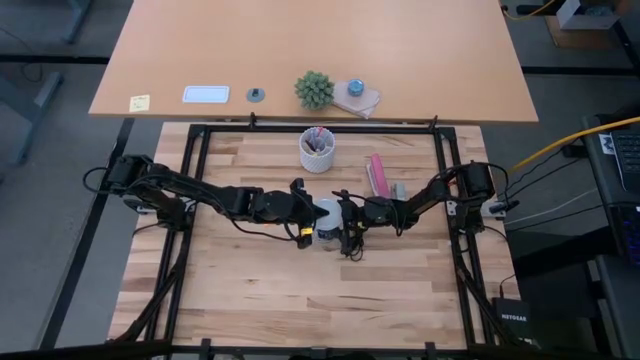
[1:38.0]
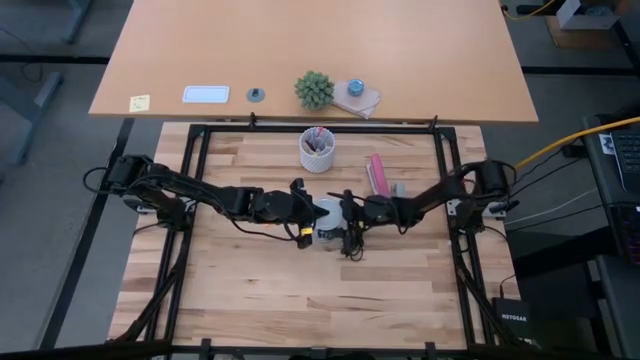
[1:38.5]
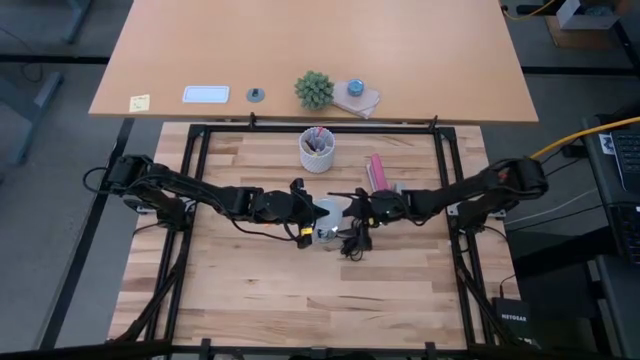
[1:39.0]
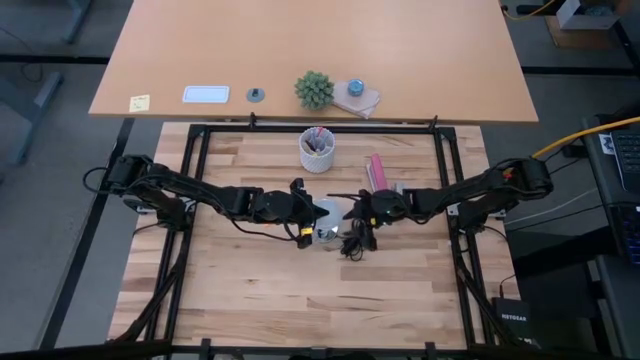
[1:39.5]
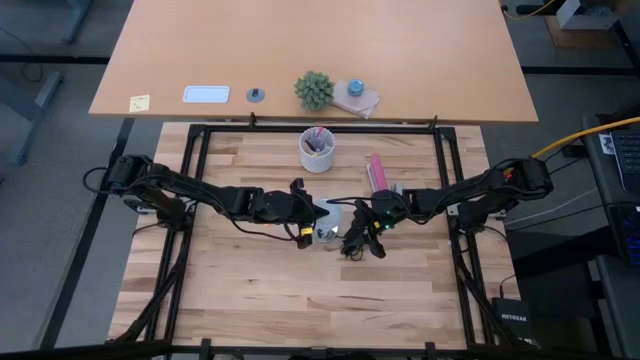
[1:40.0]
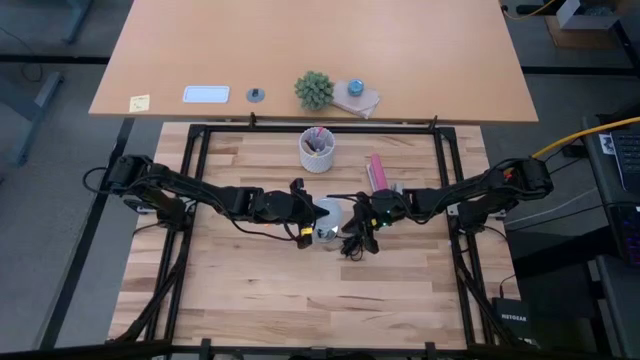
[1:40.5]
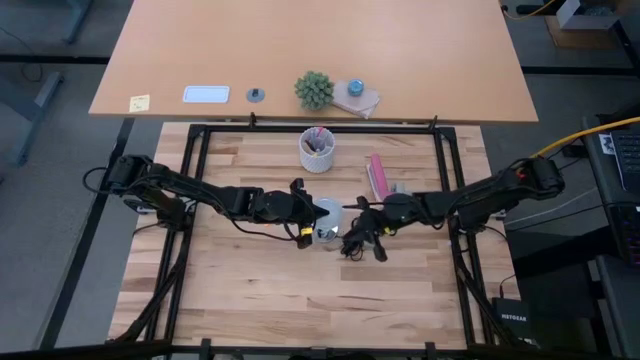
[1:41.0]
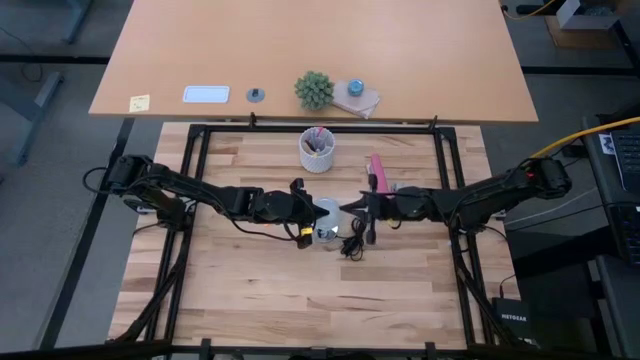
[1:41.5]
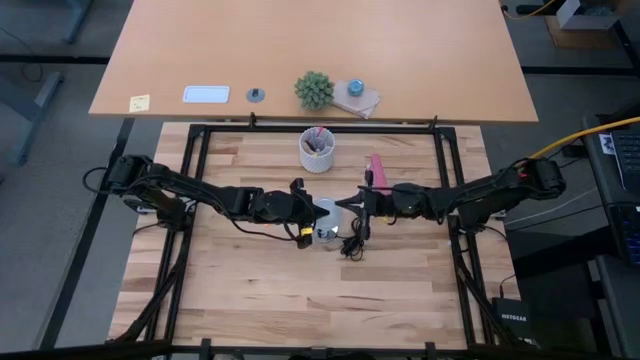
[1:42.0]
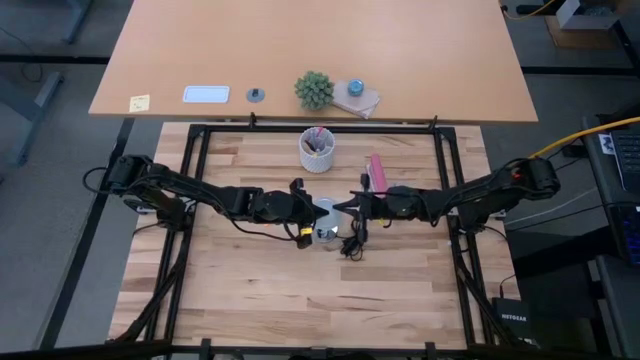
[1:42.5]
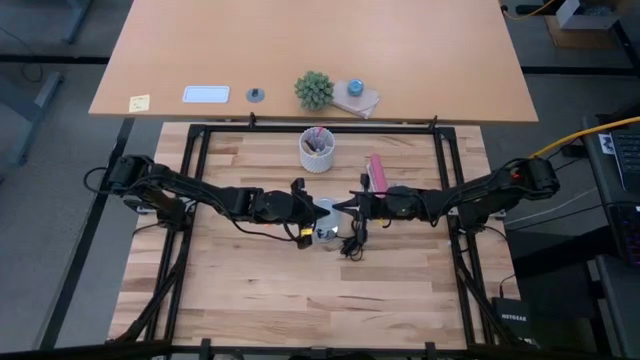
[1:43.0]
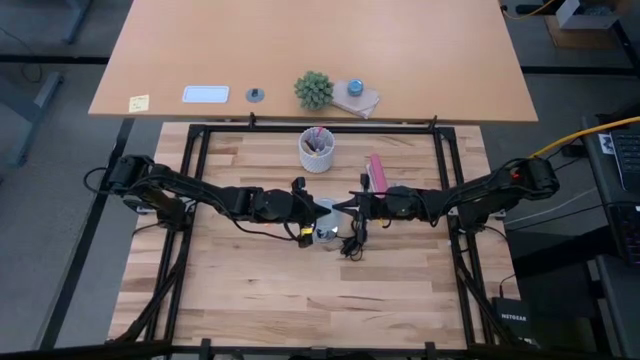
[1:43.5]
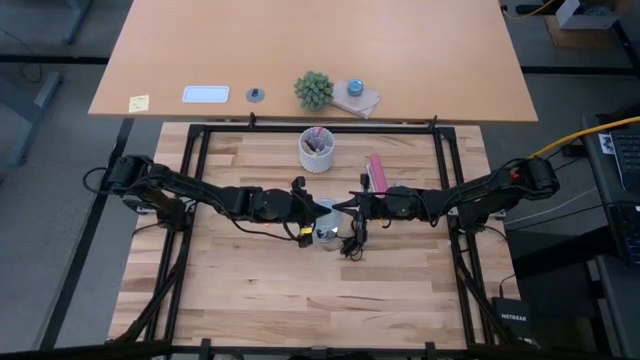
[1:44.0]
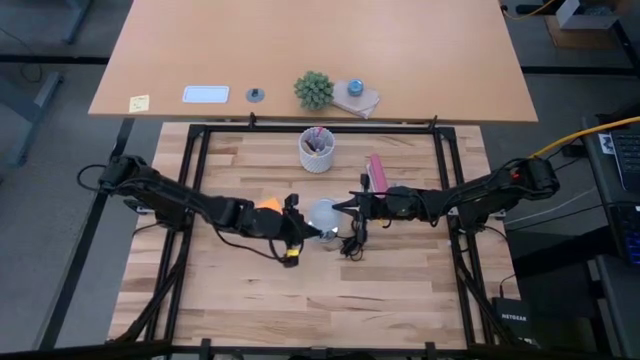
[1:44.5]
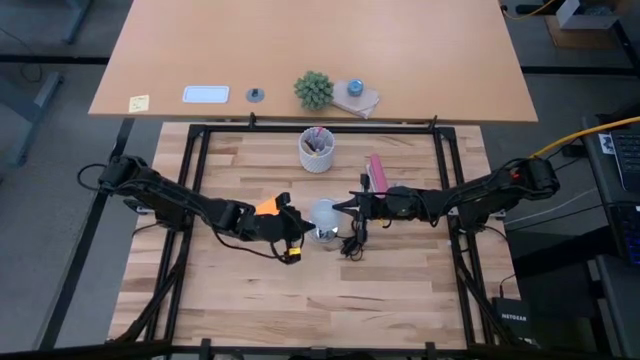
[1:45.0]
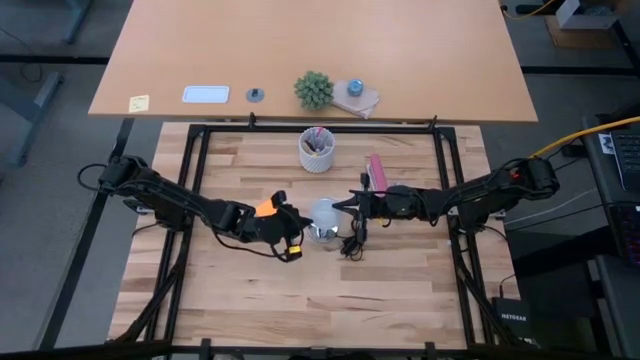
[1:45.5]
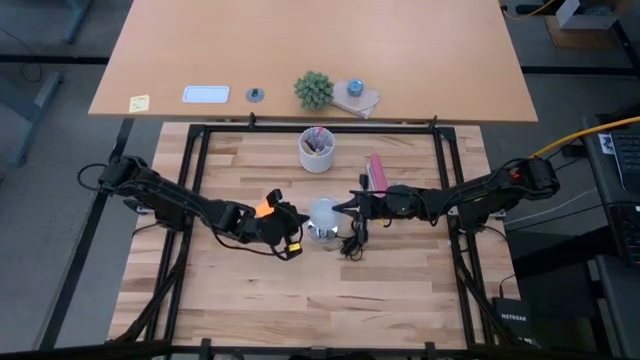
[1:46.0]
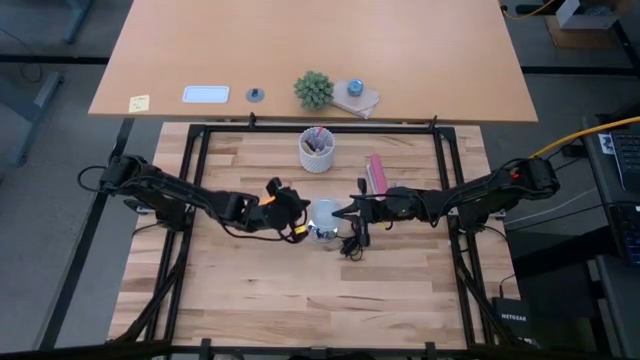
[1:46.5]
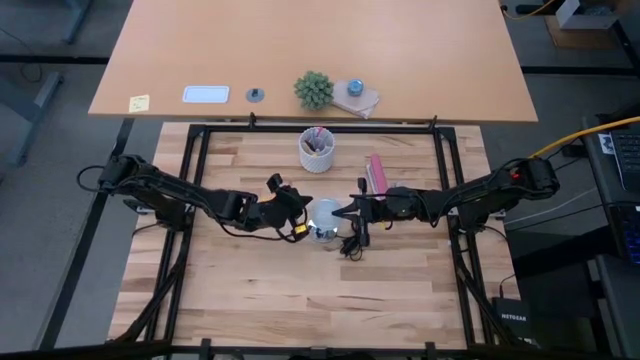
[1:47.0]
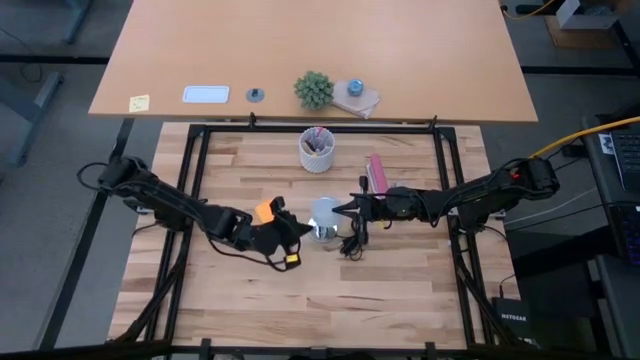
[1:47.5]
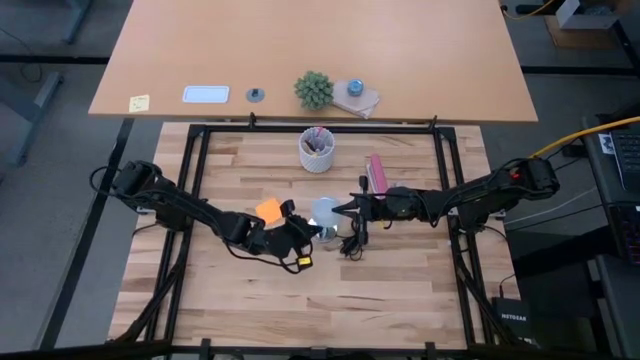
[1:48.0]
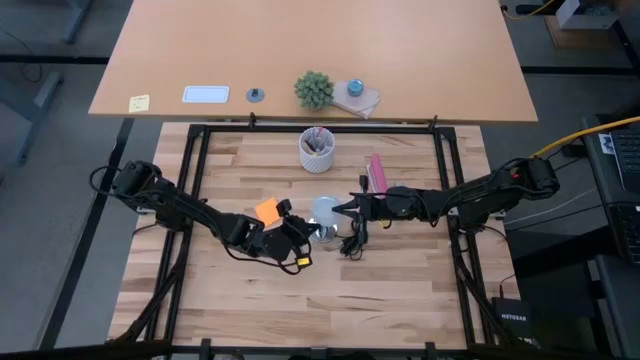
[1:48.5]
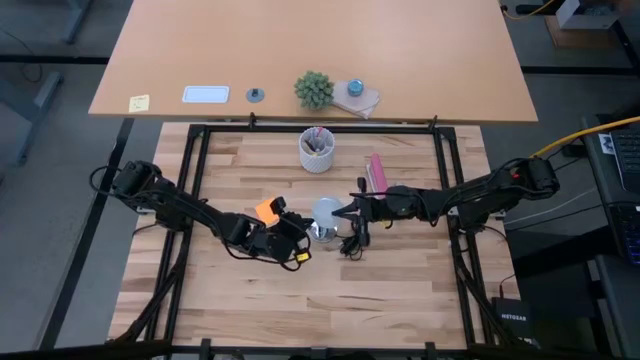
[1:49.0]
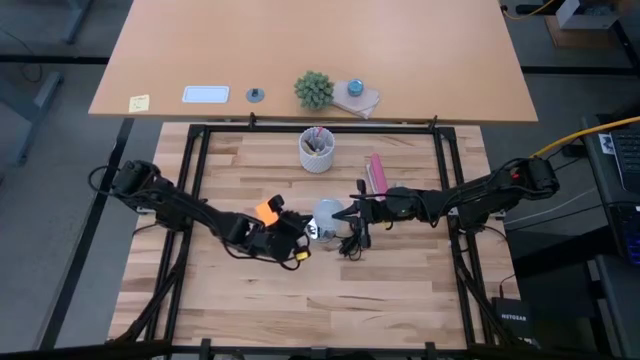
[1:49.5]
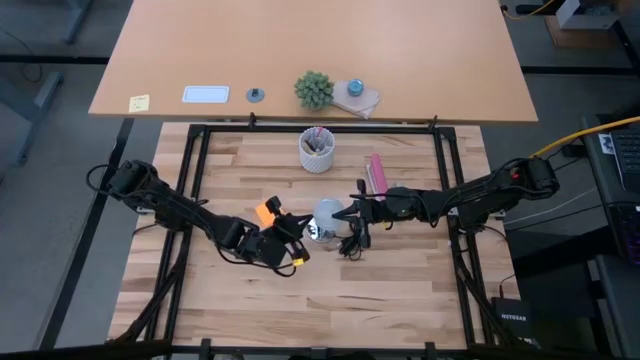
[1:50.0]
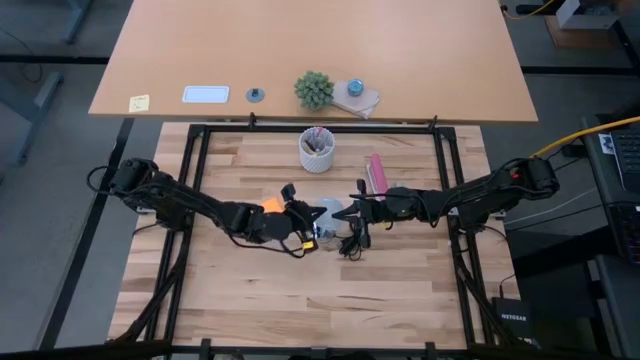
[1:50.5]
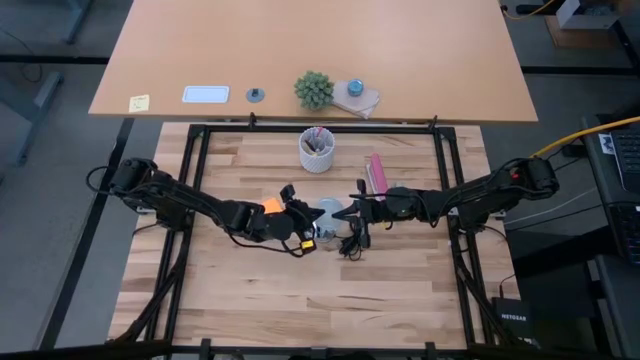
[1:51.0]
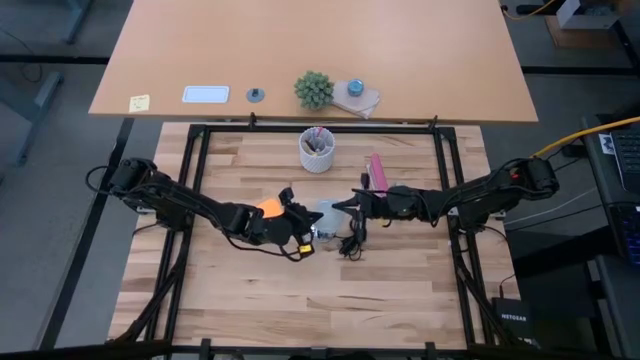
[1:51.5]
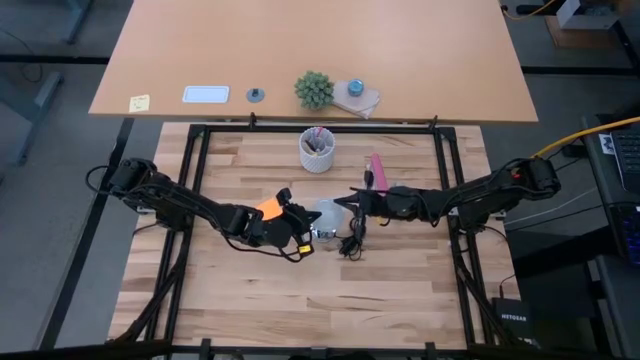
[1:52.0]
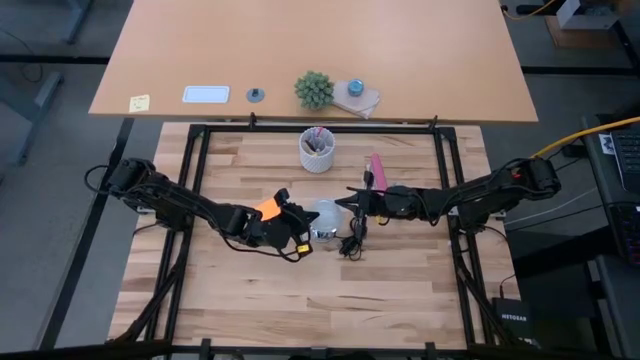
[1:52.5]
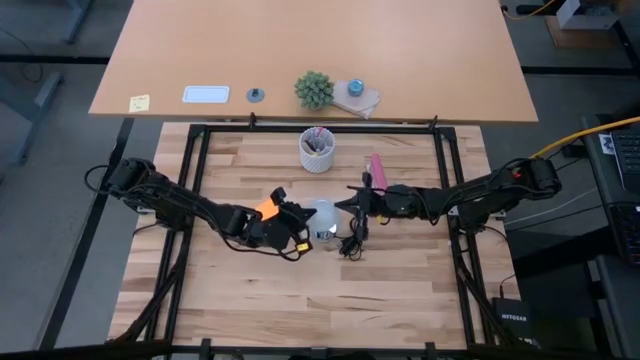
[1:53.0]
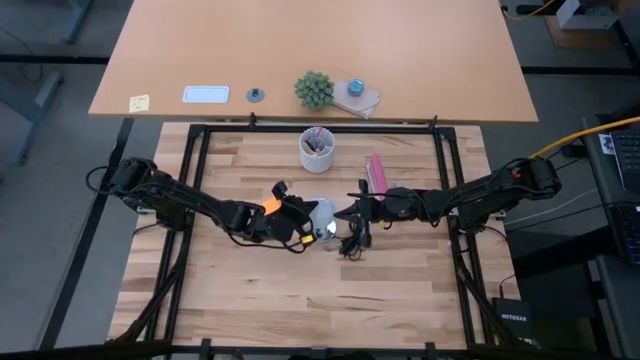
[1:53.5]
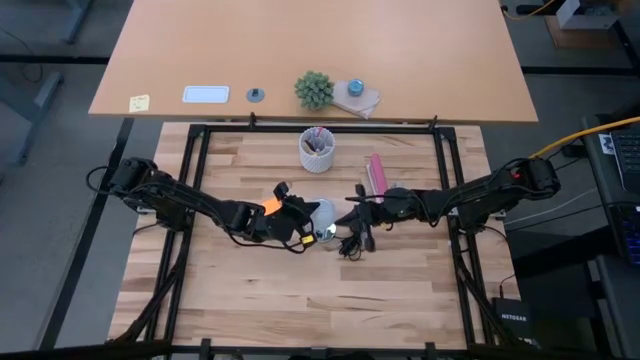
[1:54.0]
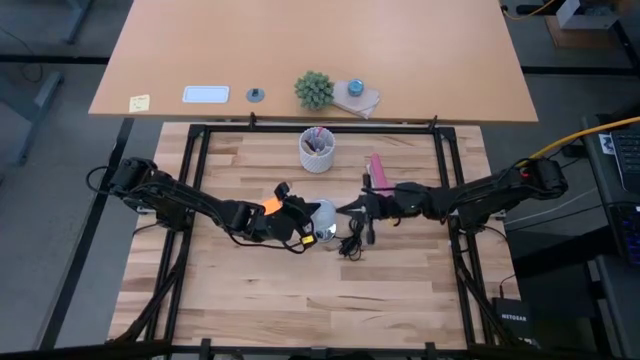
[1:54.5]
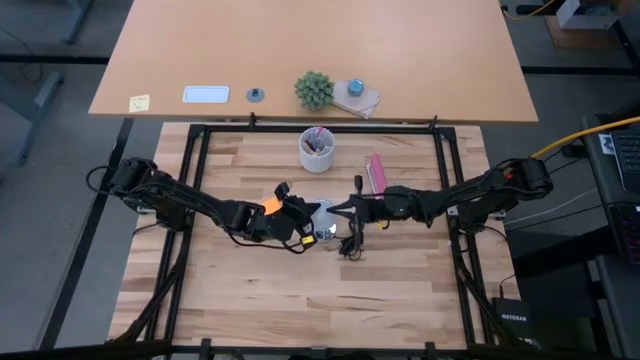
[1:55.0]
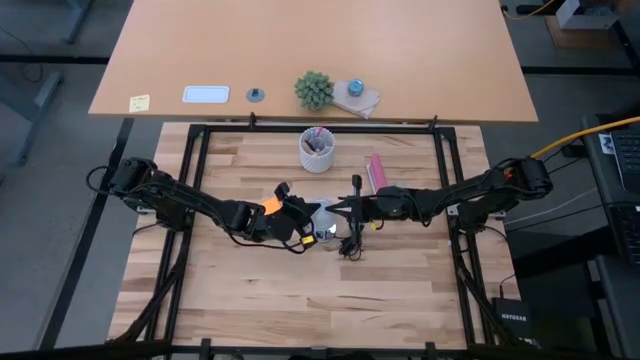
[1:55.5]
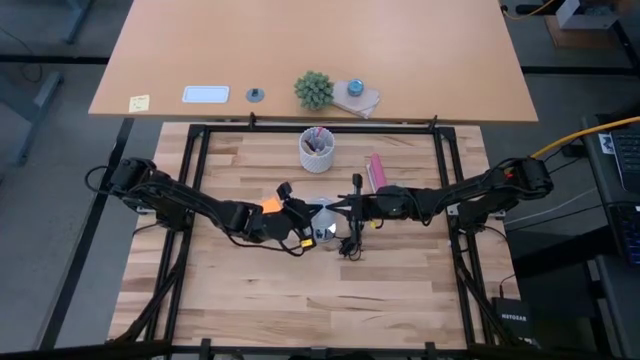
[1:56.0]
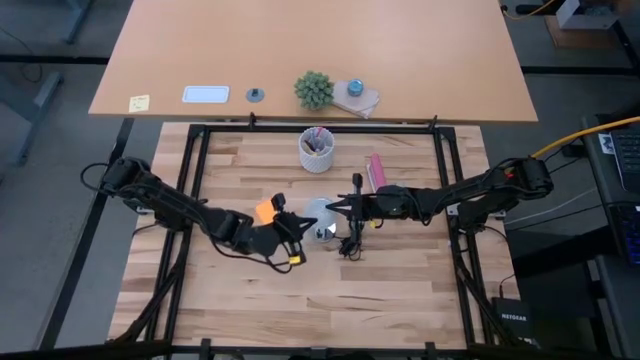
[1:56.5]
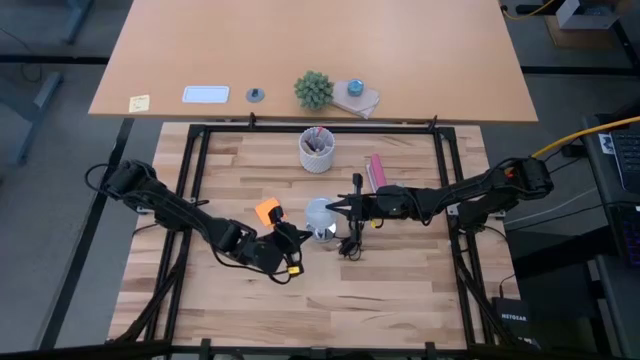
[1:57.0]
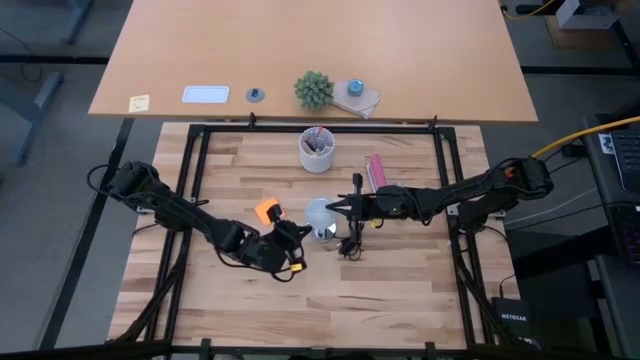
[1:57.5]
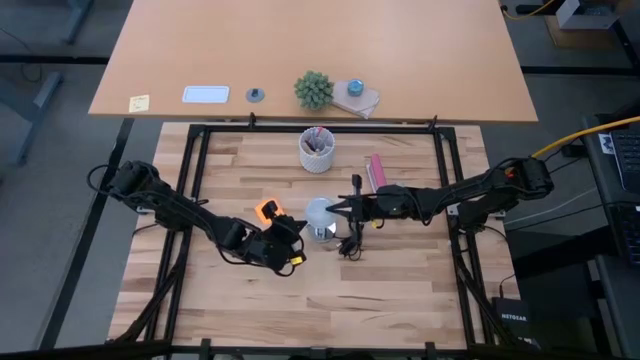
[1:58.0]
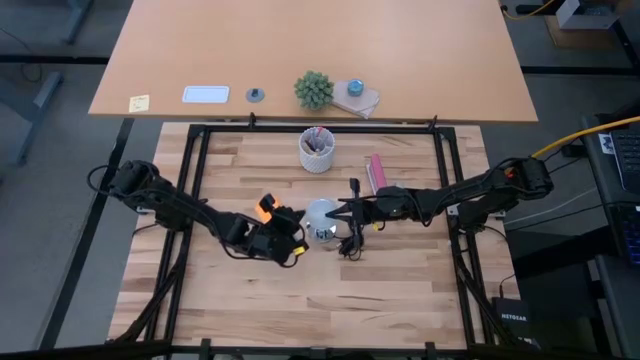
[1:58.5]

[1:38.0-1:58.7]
Task: Screw lightbulb
Insert the lightbulb into the lamp
